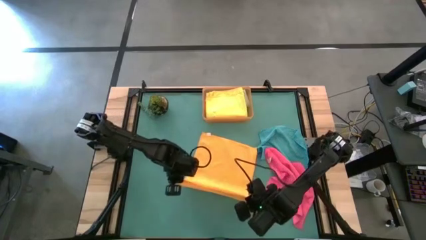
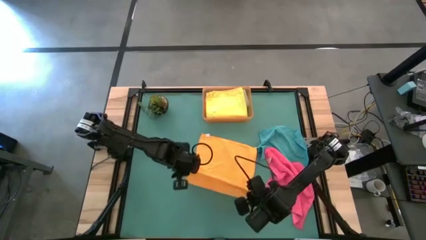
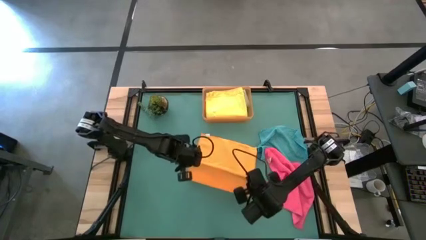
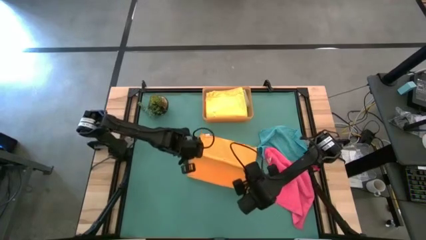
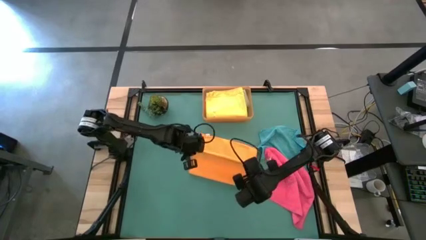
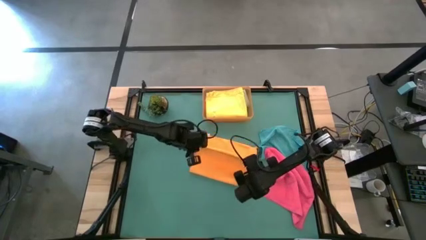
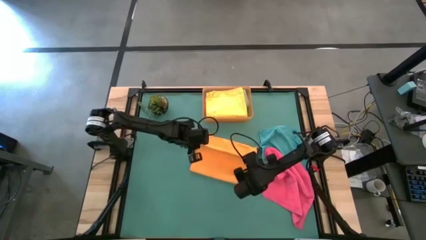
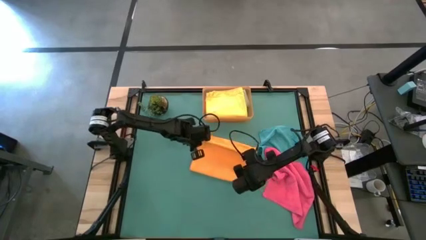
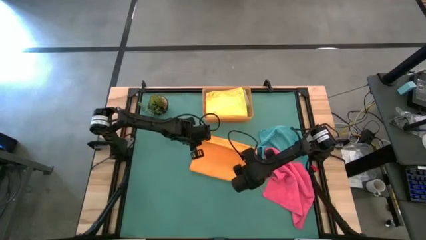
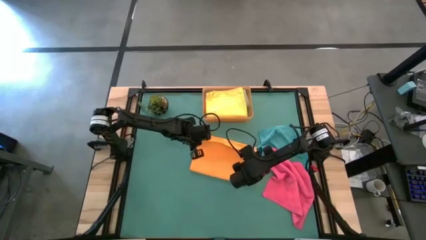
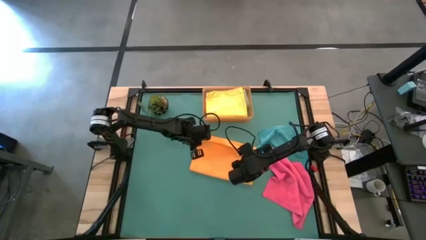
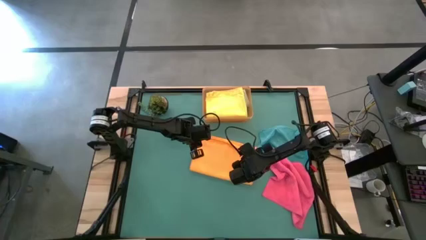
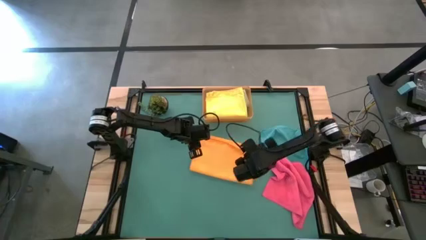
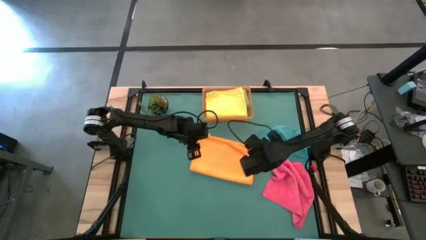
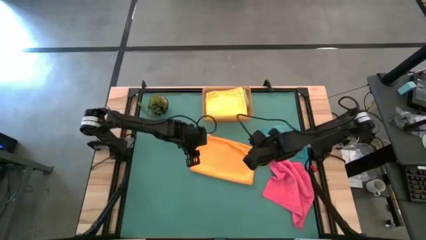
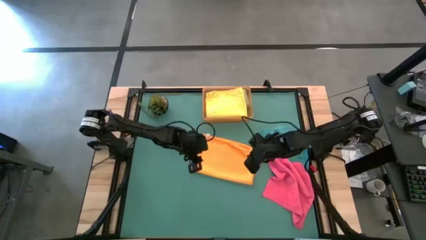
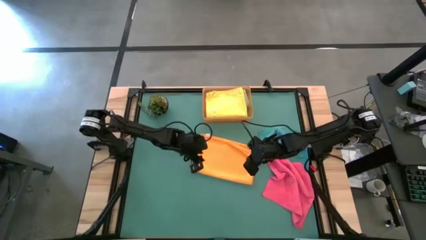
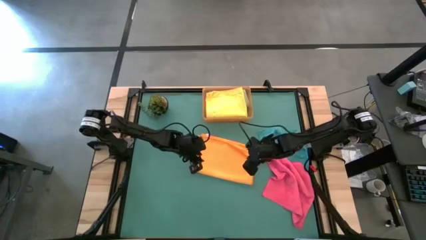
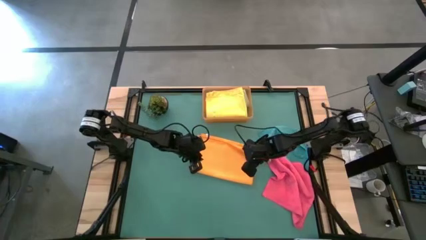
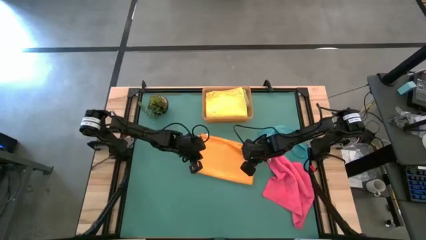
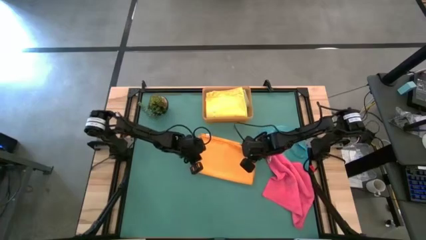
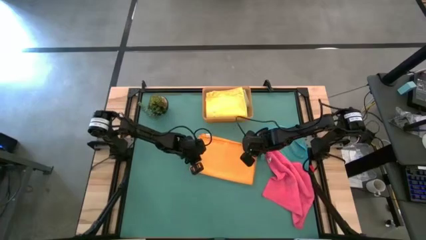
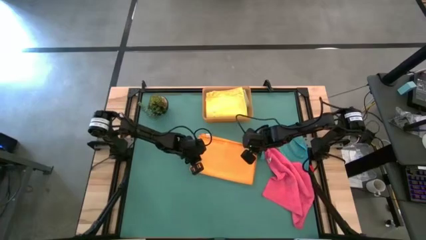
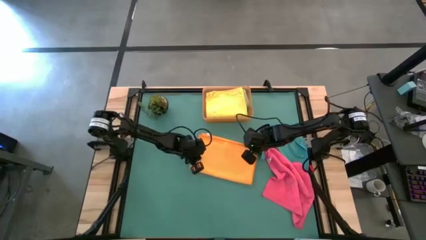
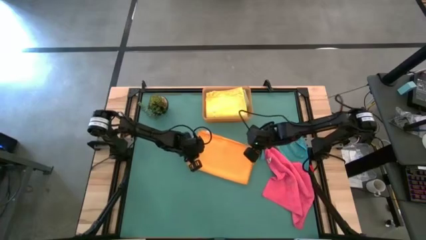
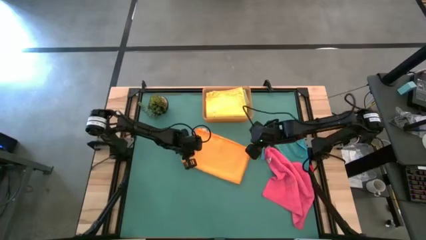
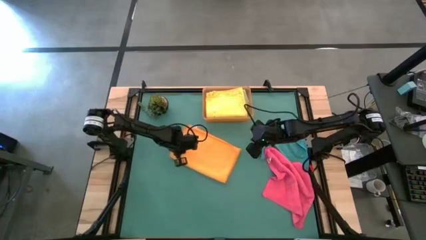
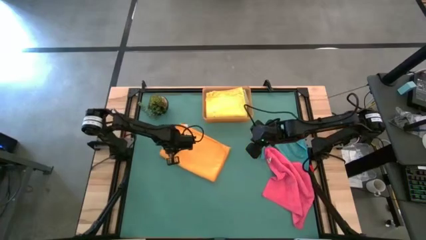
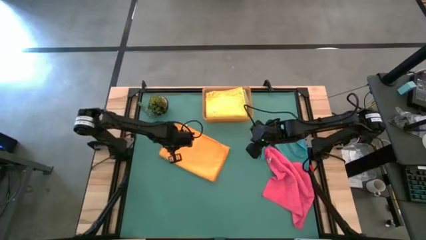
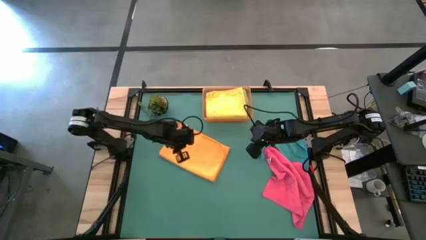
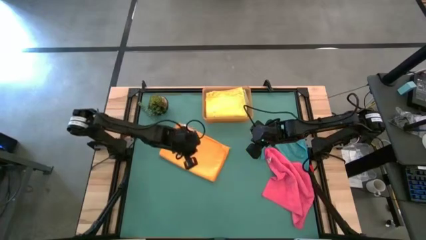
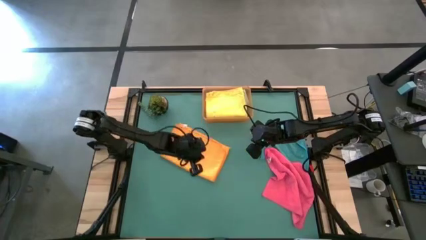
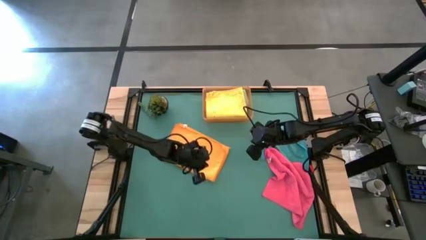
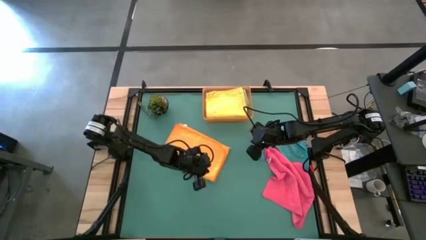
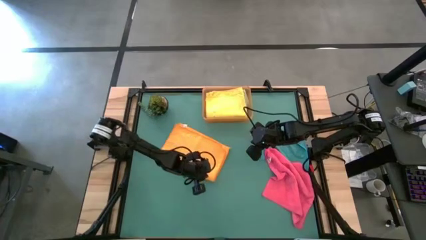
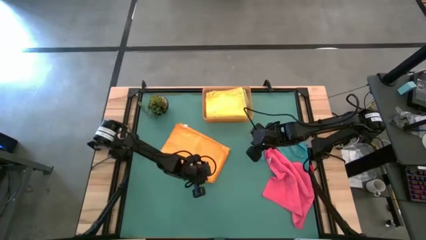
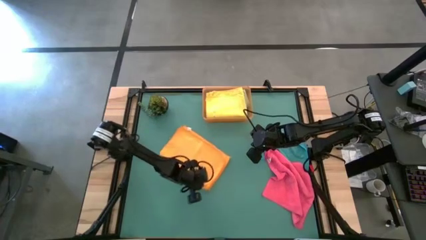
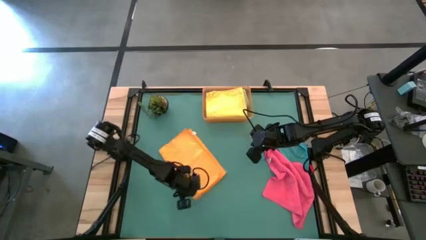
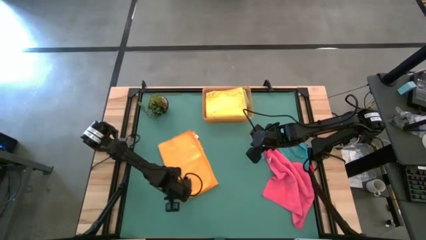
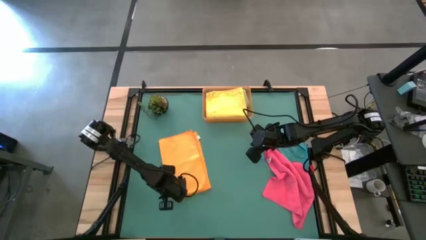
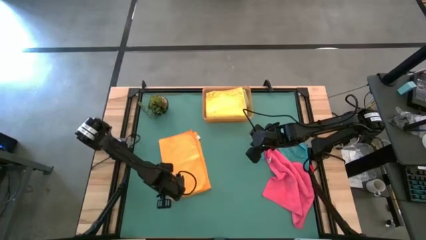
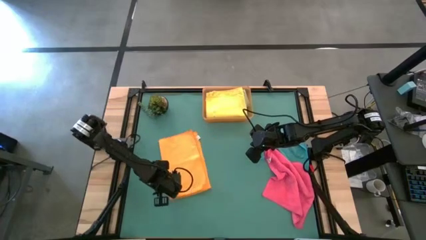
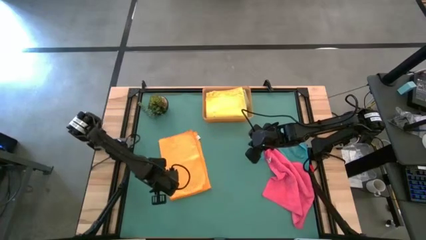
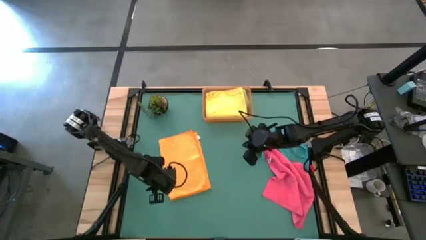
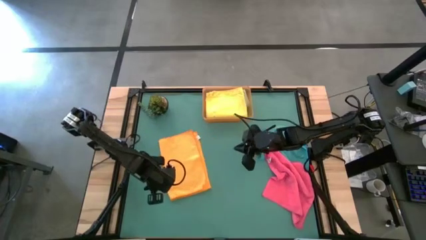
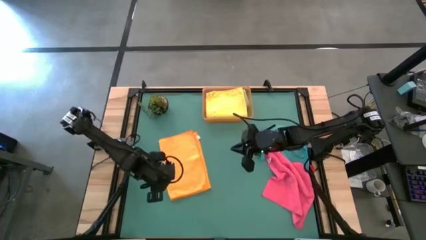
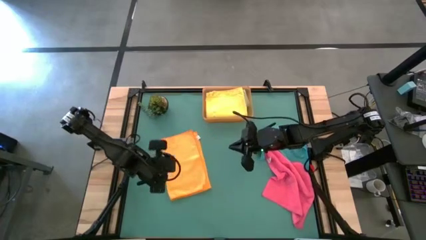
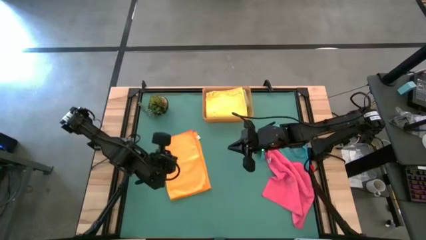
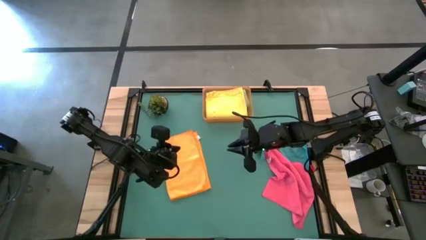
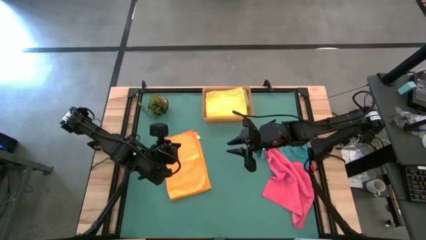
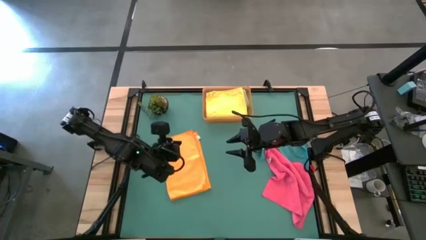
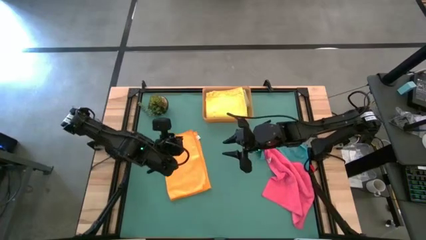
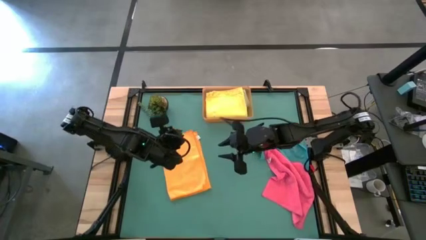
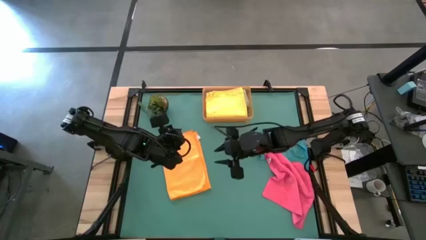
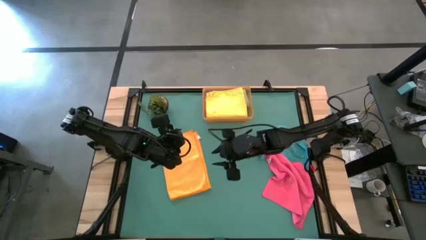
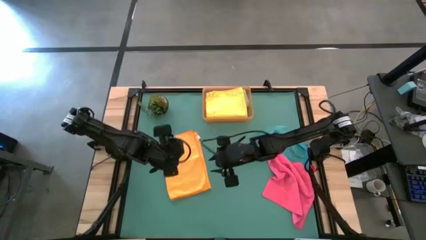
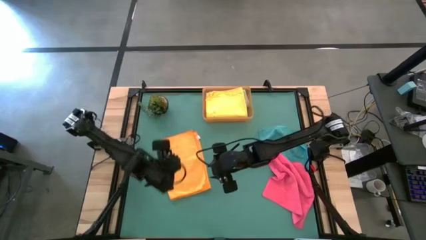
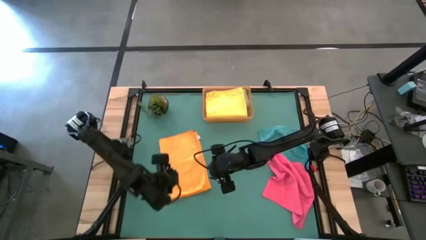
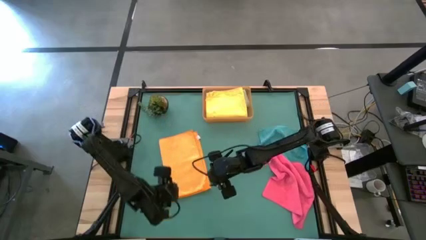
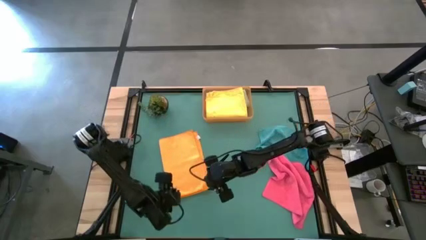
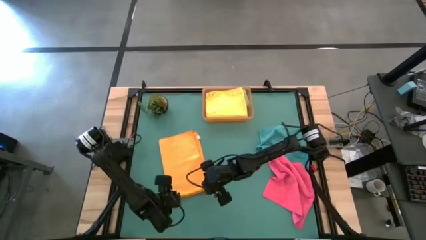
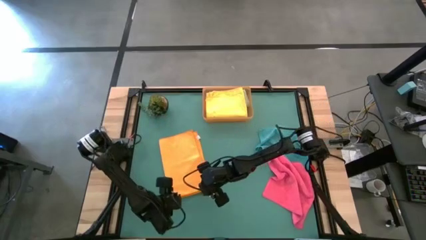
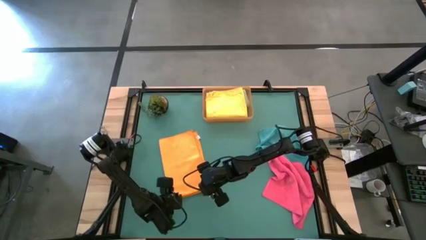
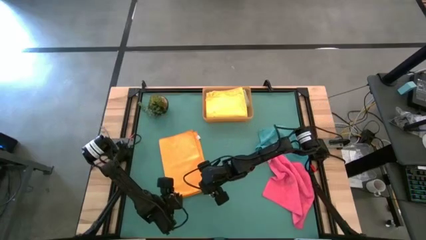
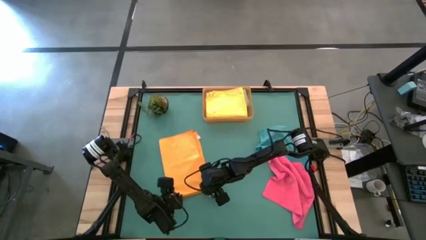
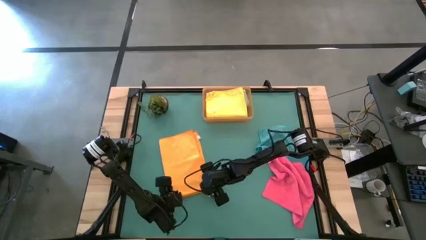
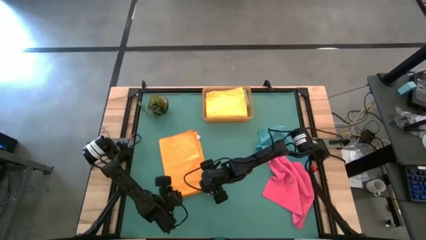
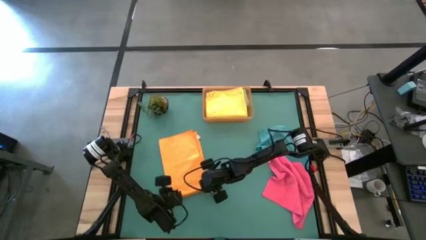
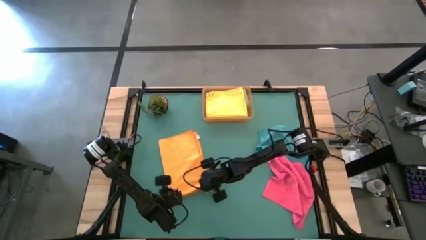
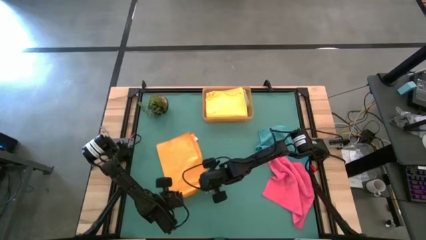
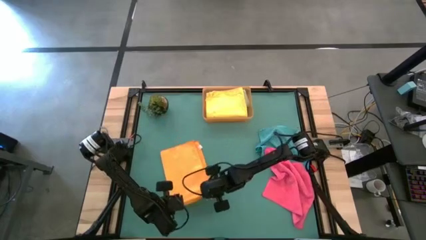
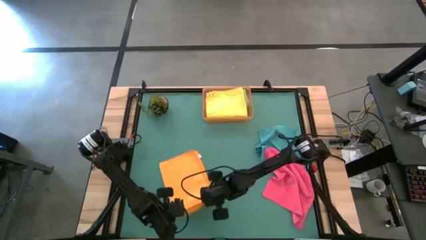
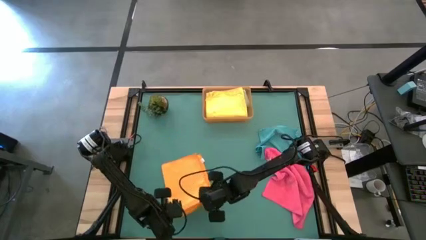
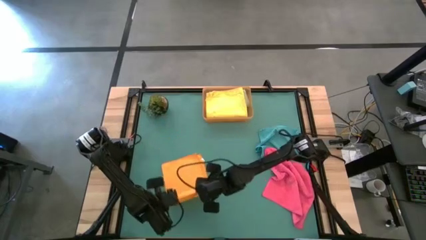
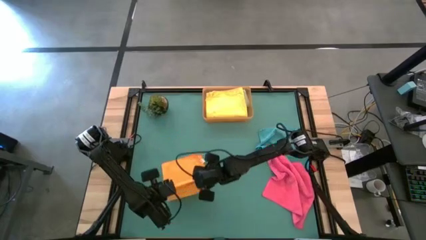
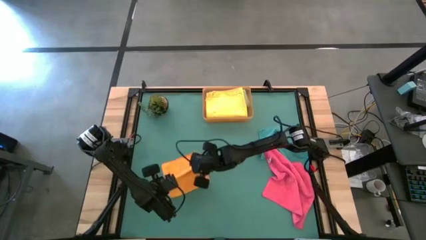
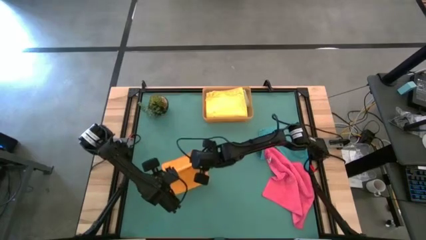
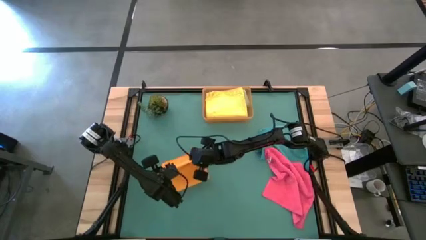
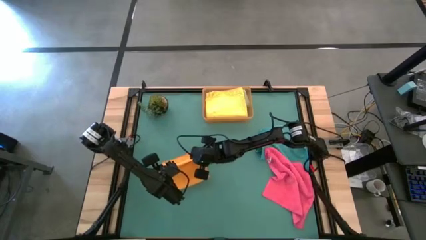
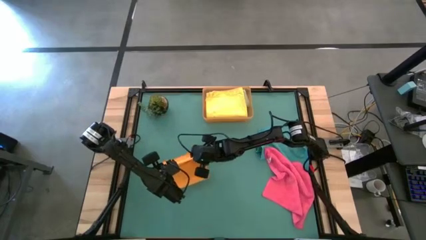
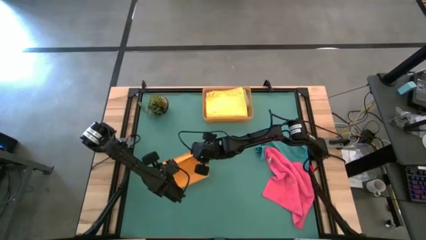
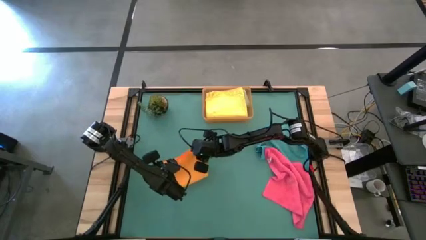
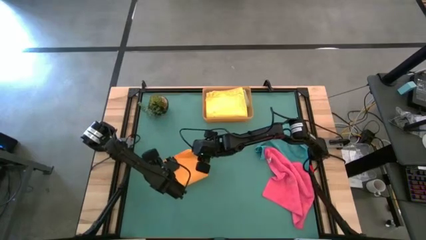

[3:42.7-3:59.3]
Task: Fold microfiber towels
Fold the orange towel
